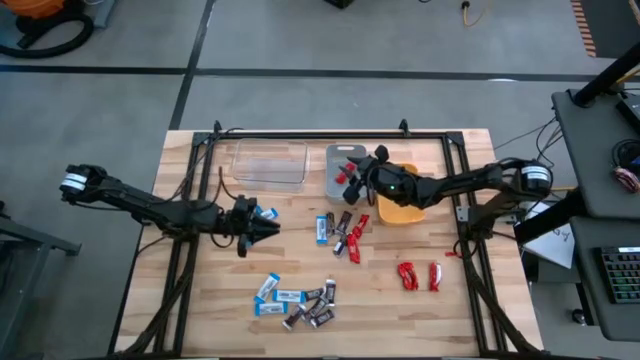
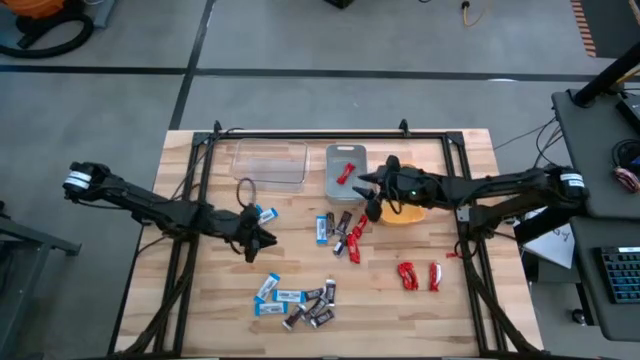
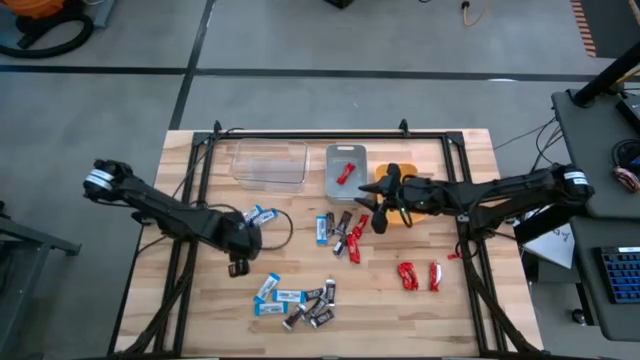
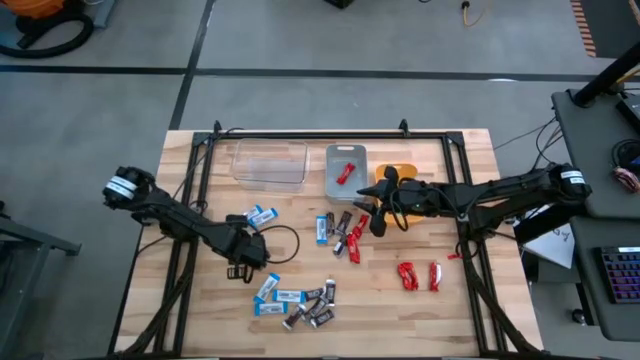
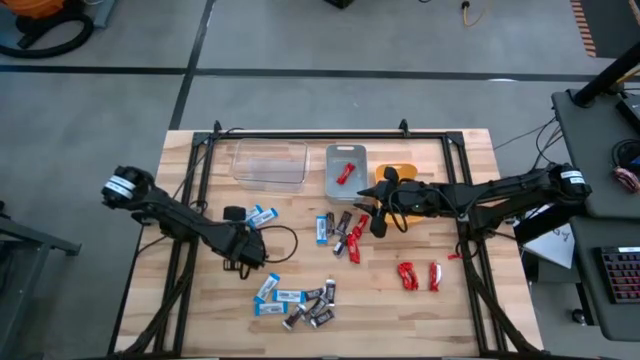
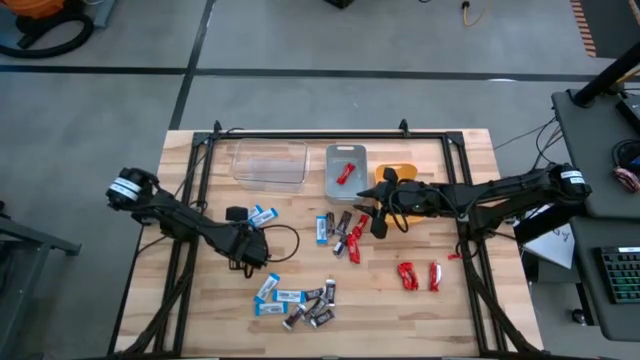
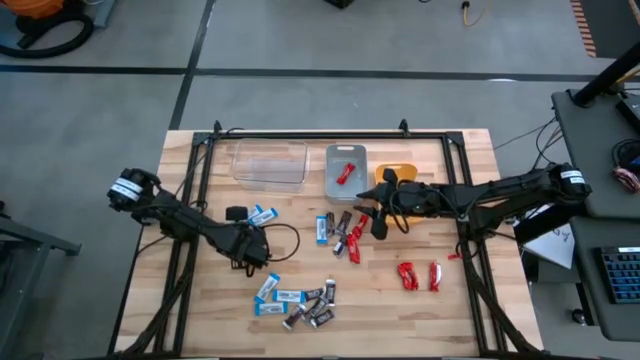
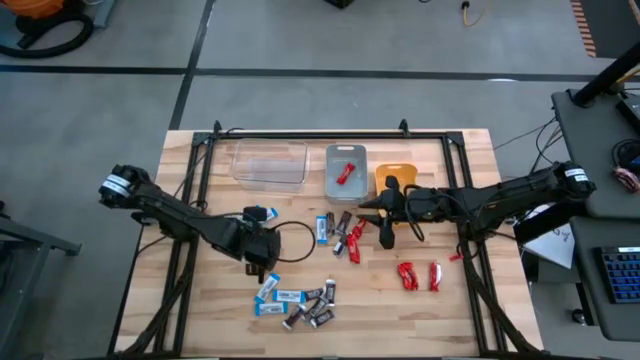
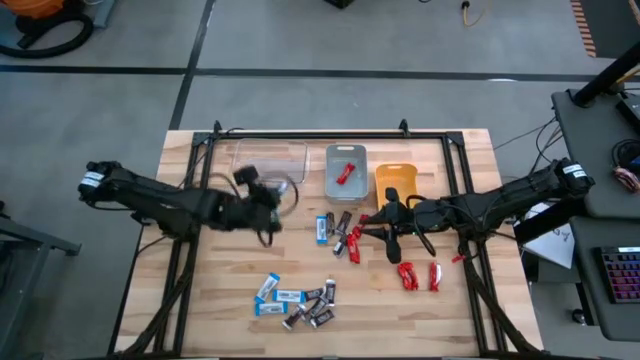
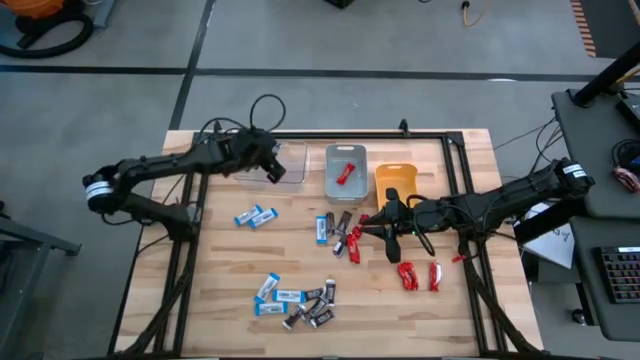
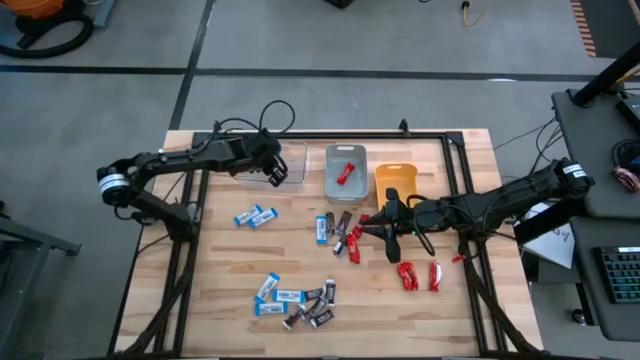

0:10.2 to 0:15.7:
Task: Organize candy in baskets
Put the white chocolate into the transparent bin

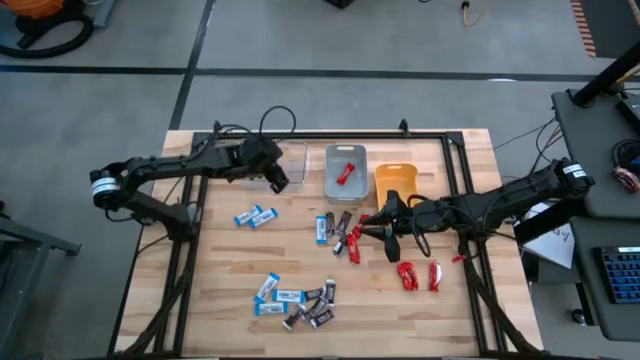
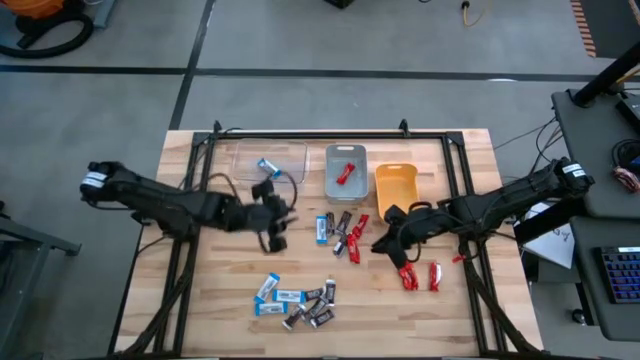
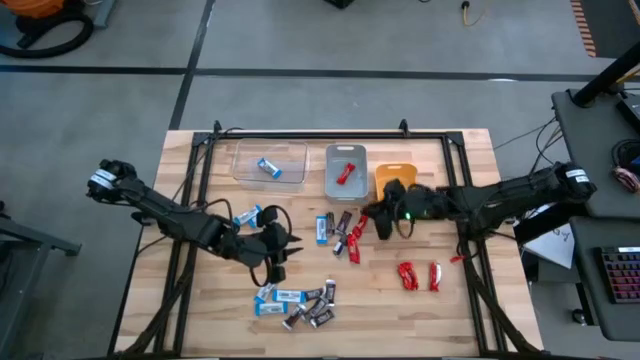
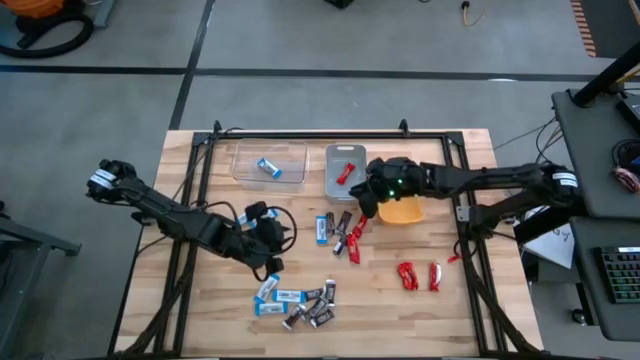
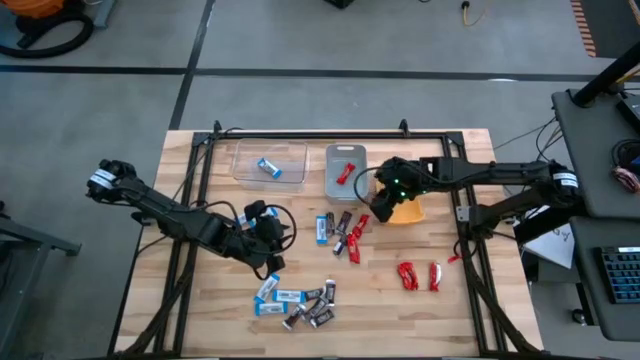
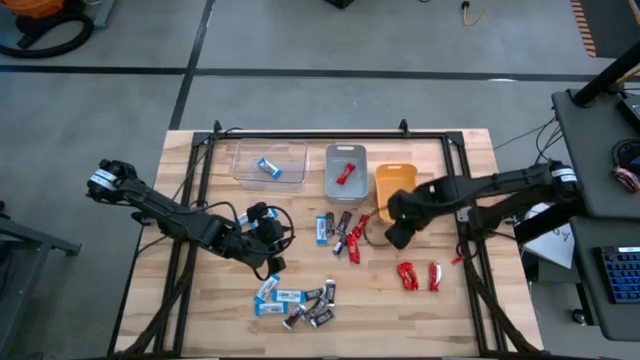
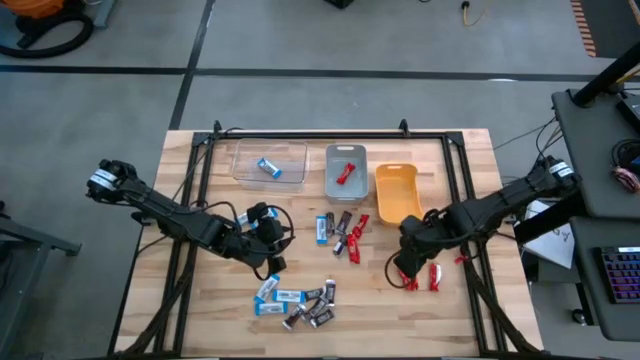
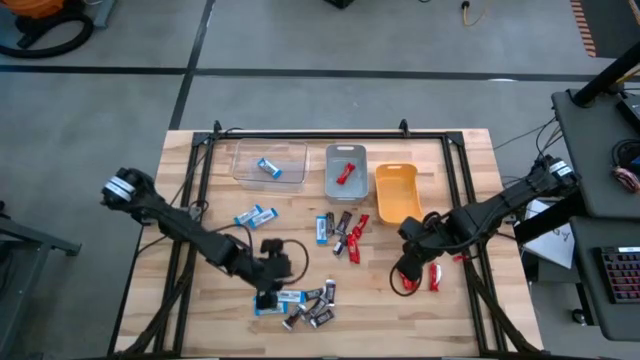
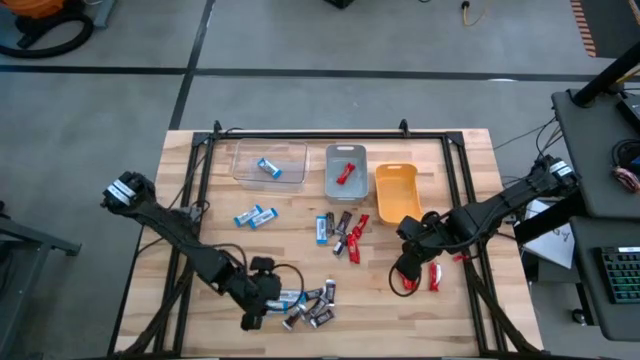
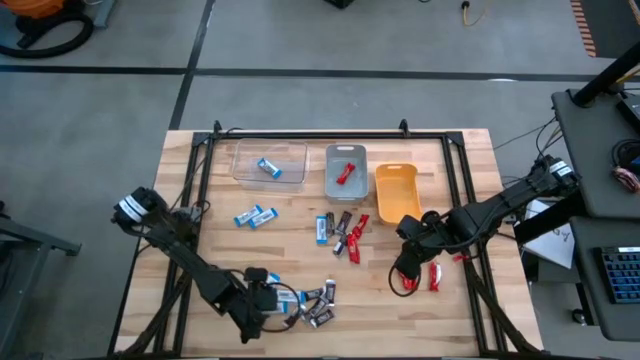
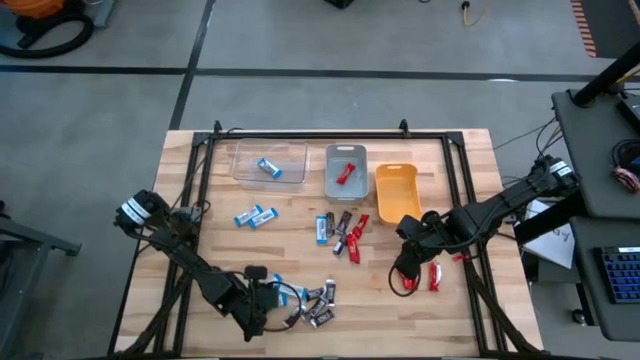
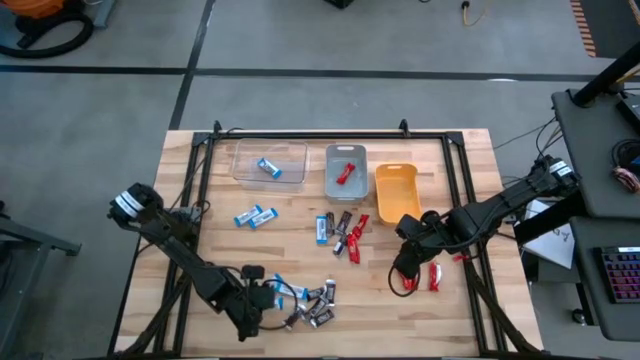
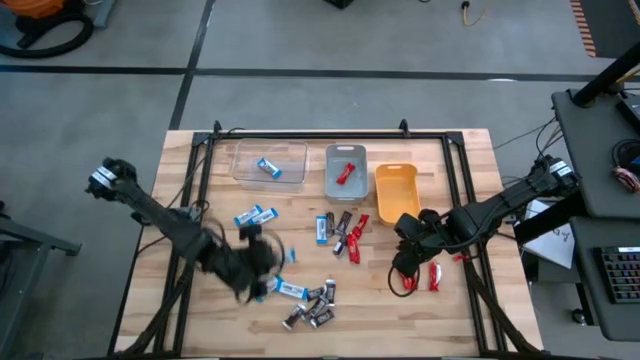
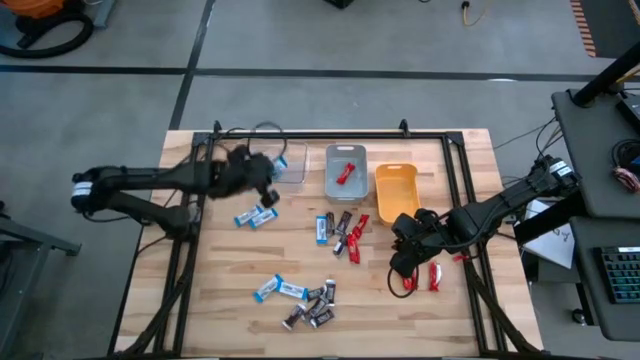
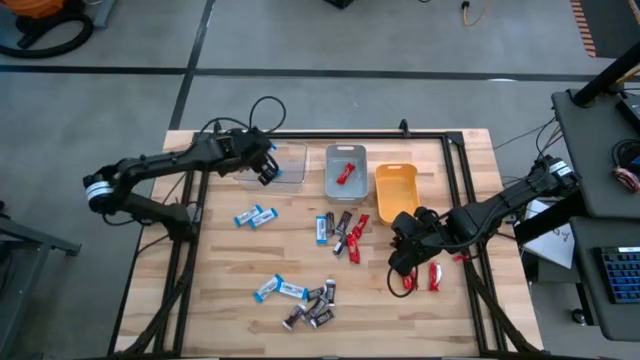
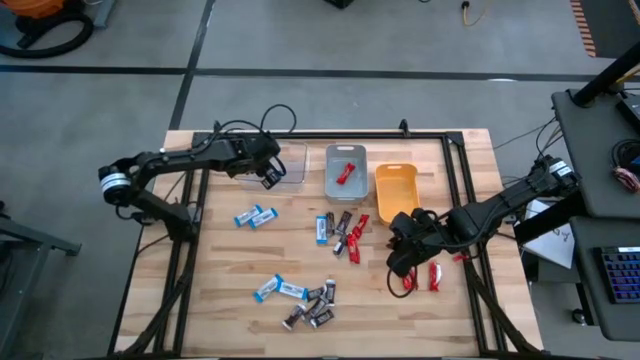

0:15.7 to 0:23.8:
Put the white chocolate into the transparent bin

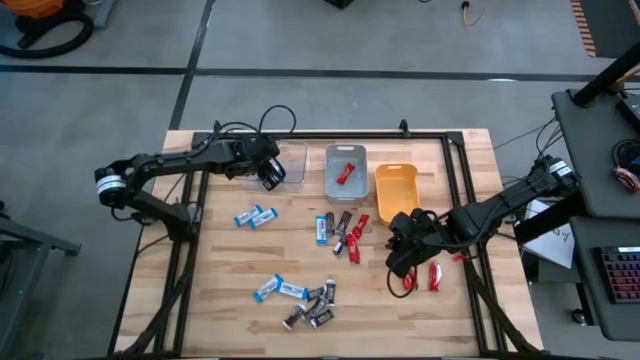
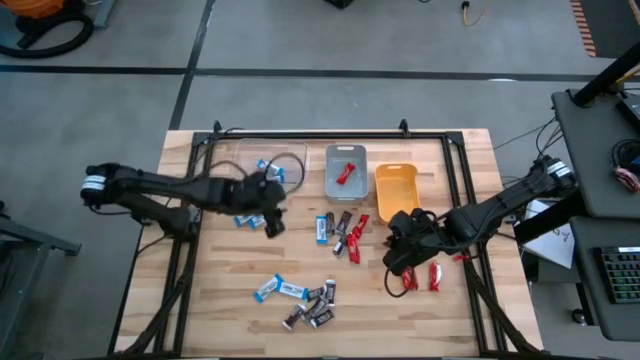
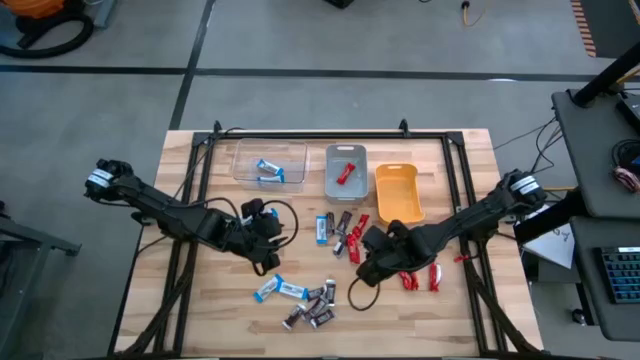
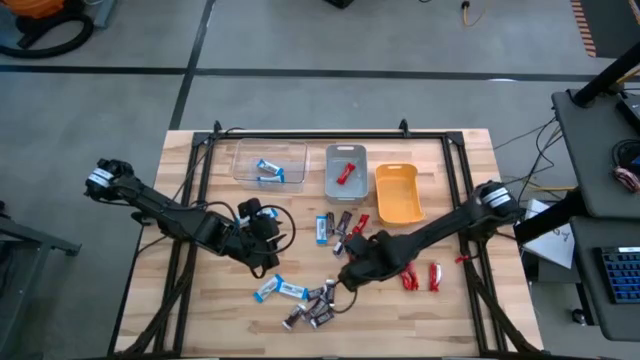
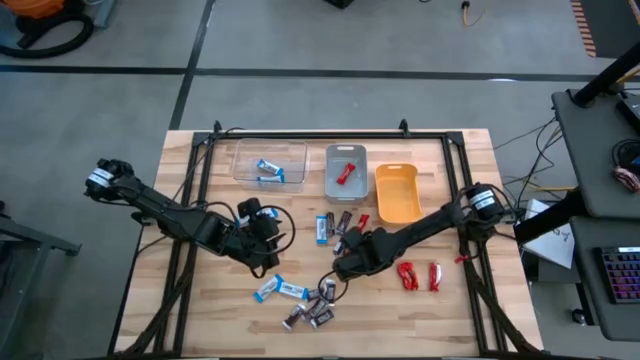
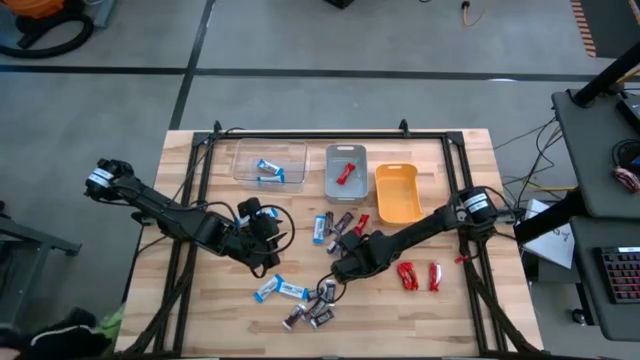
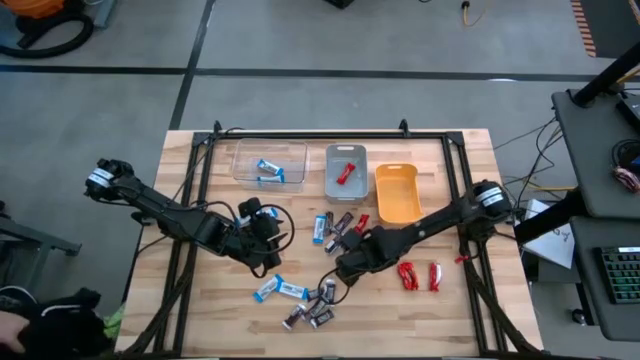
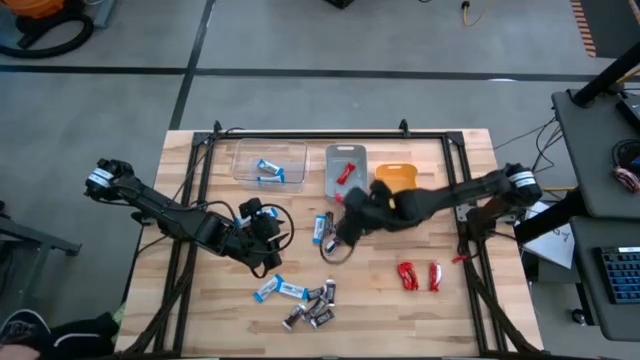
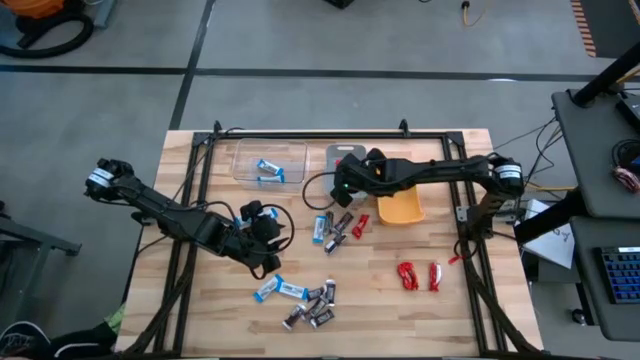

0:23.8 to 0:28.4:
Put the red chocolate into the gray bin

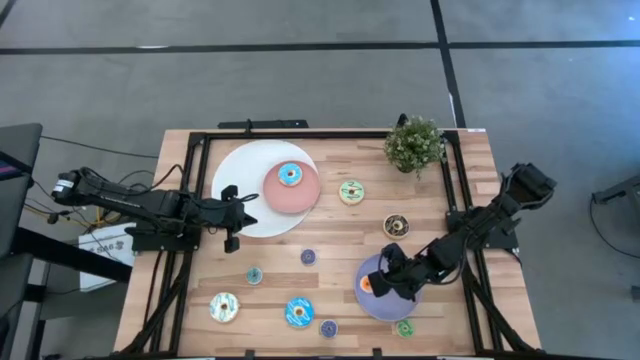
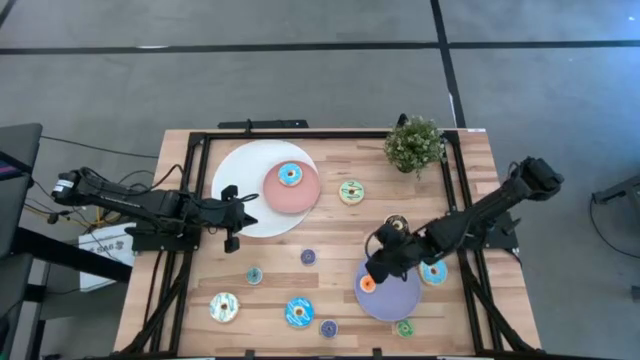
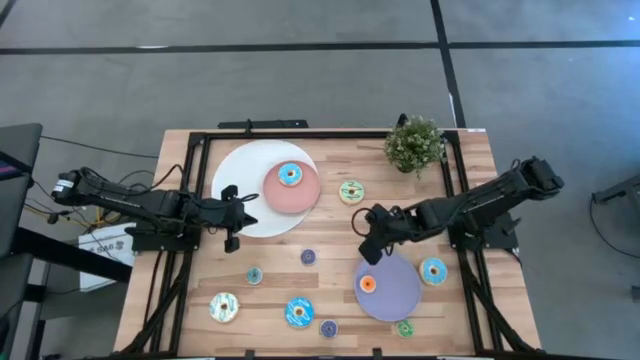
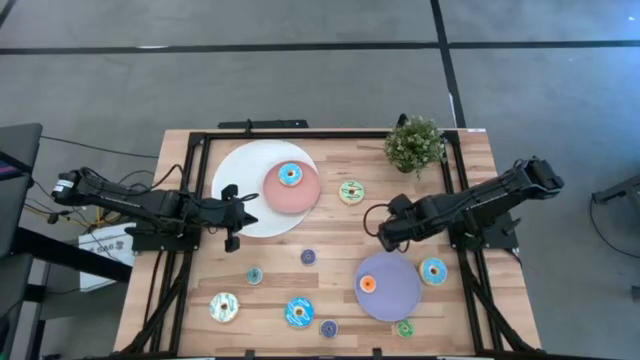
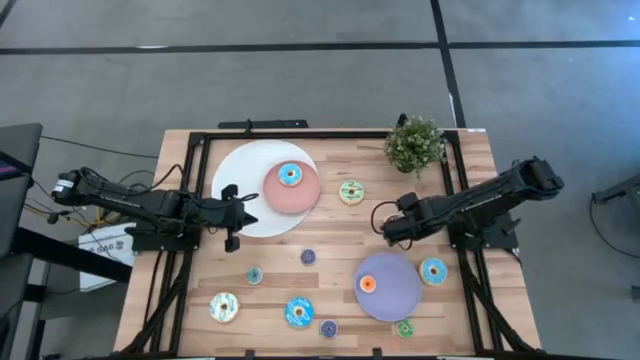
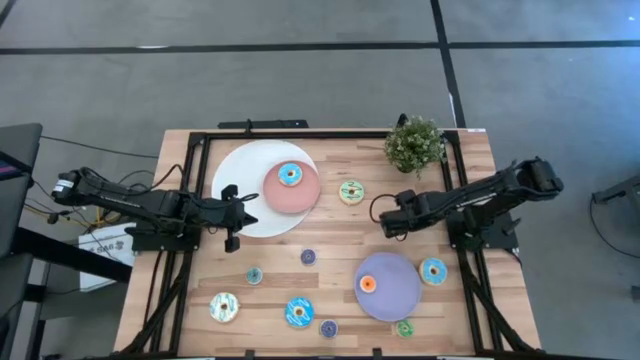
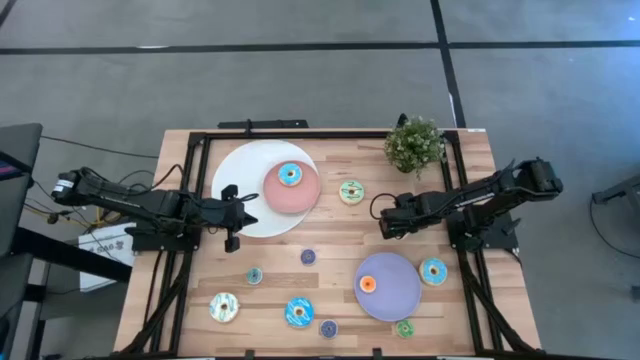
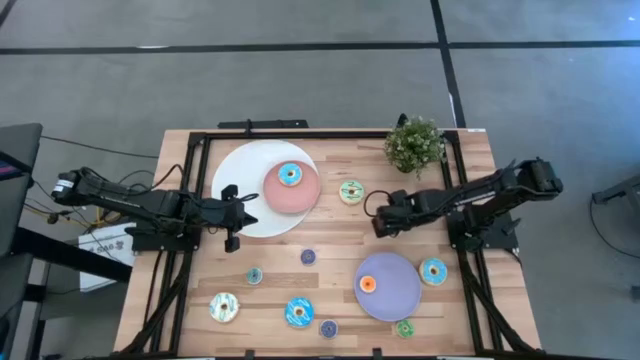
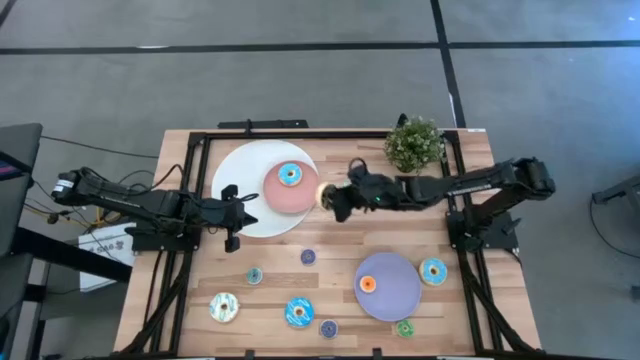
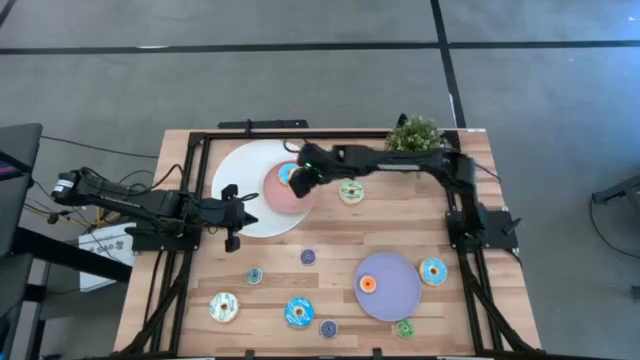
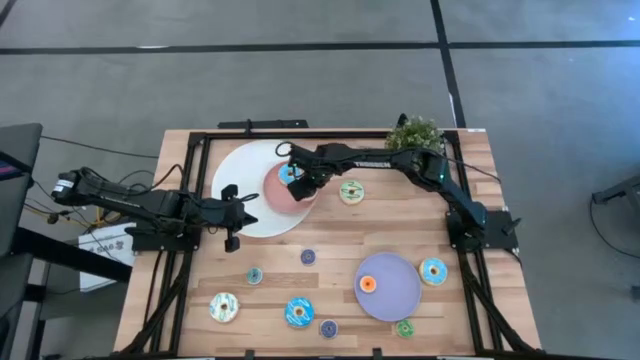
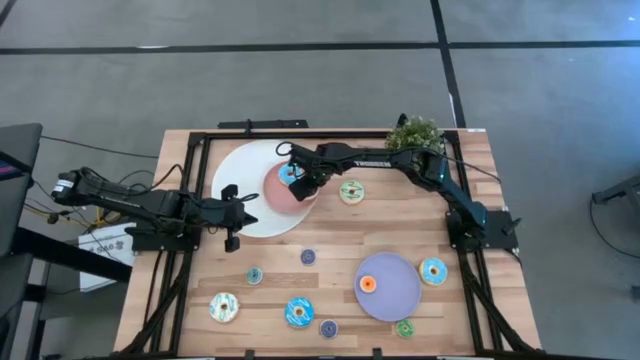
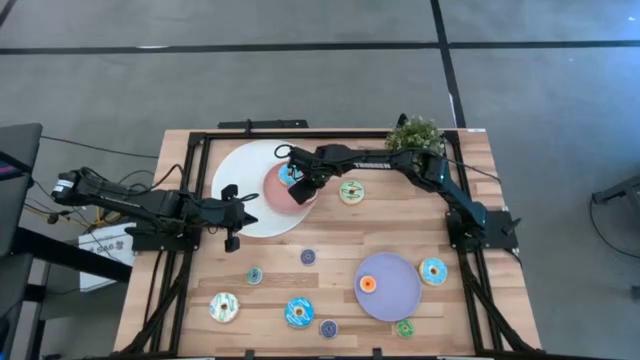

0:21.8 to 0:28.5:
Task: Pick & Place donuts
Put the large black donut on the pink plate
